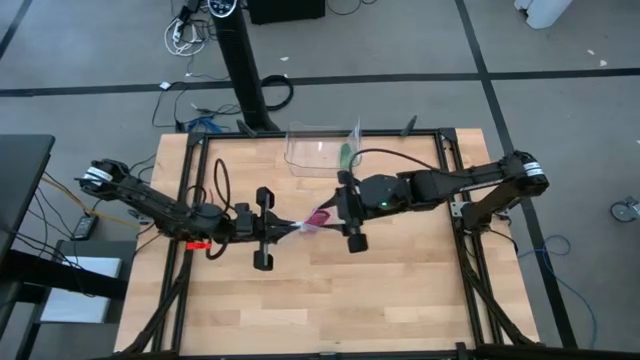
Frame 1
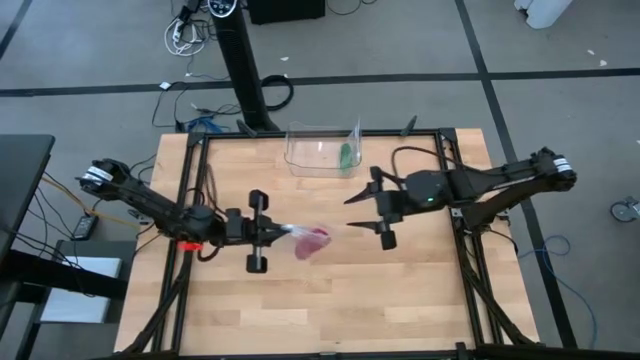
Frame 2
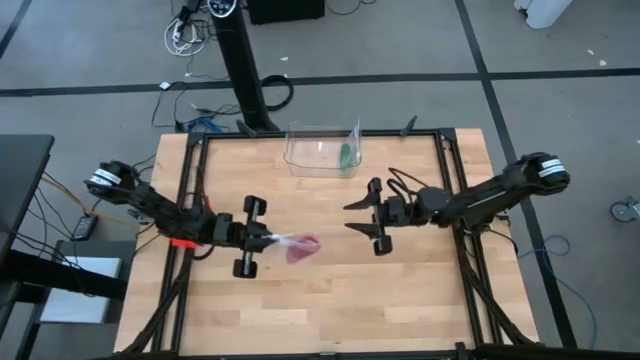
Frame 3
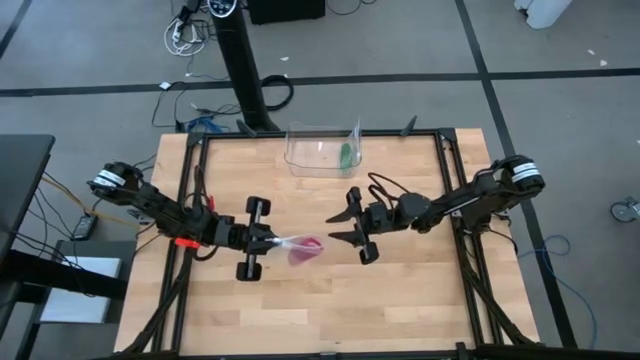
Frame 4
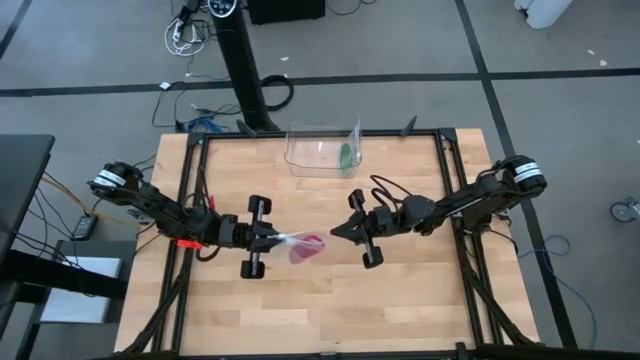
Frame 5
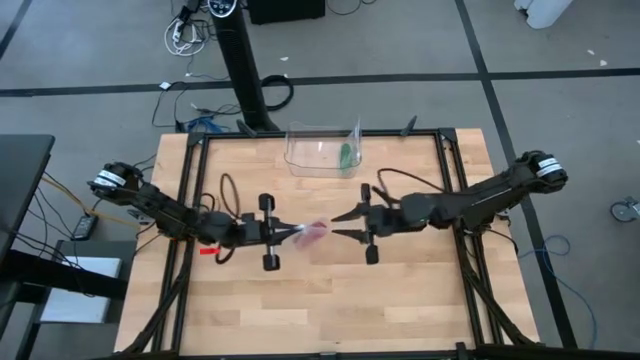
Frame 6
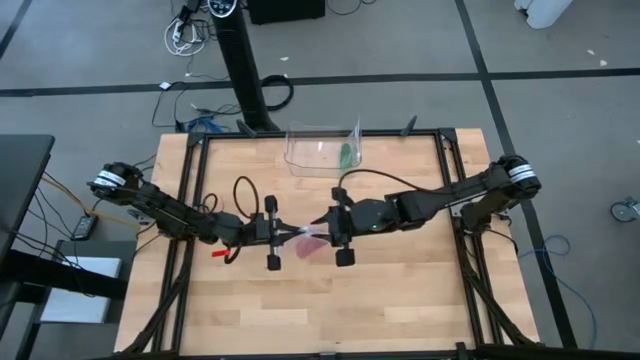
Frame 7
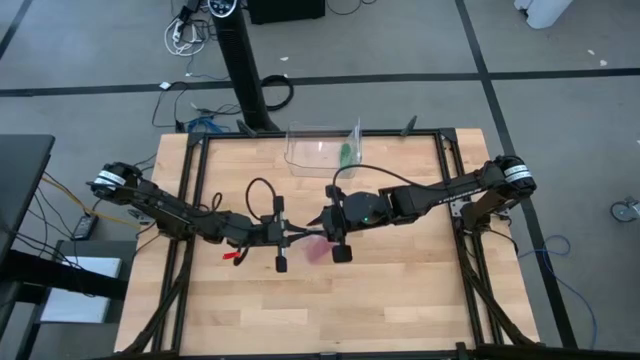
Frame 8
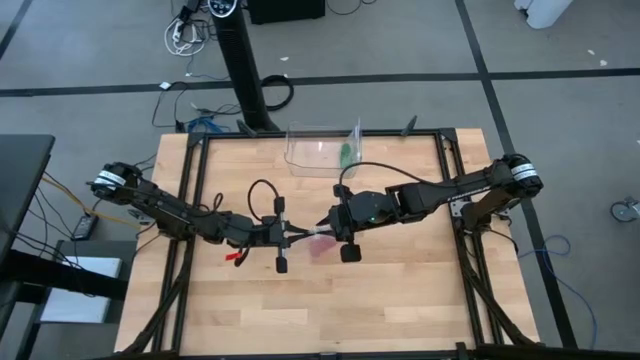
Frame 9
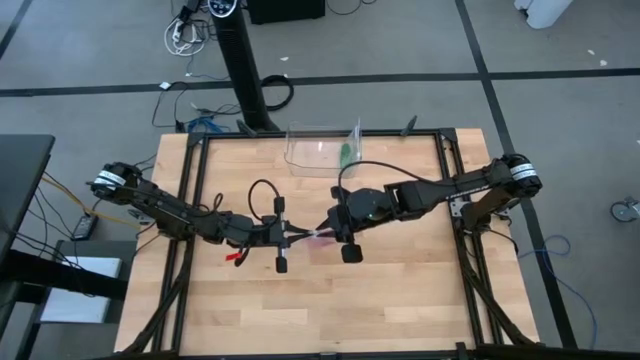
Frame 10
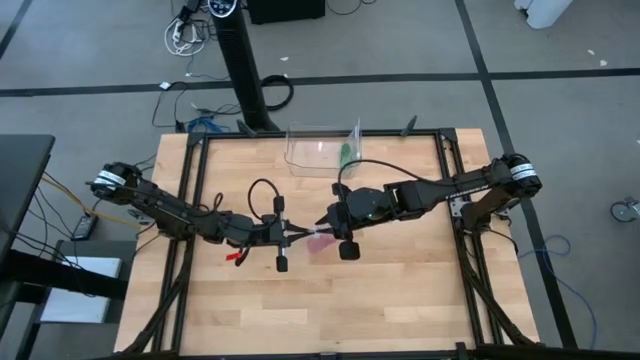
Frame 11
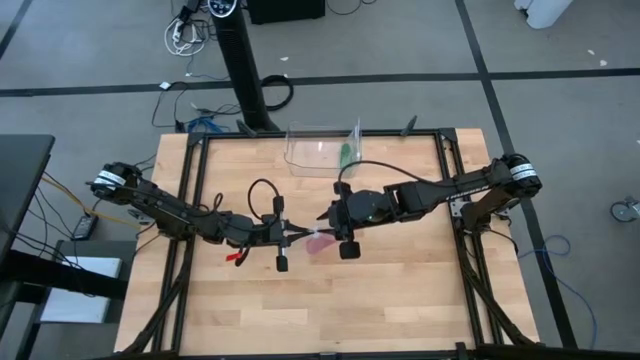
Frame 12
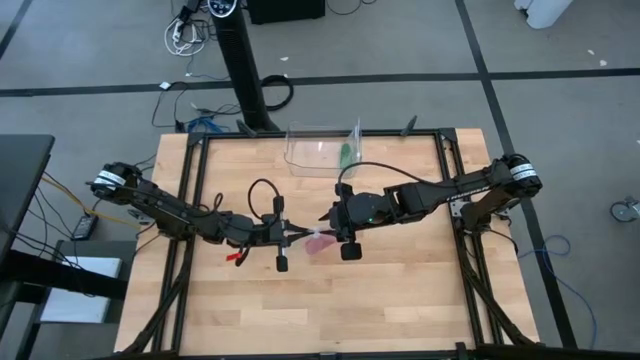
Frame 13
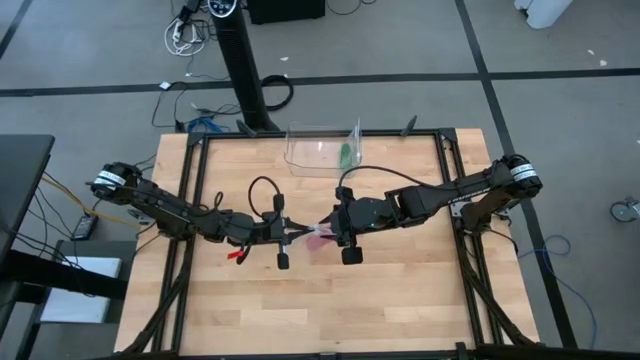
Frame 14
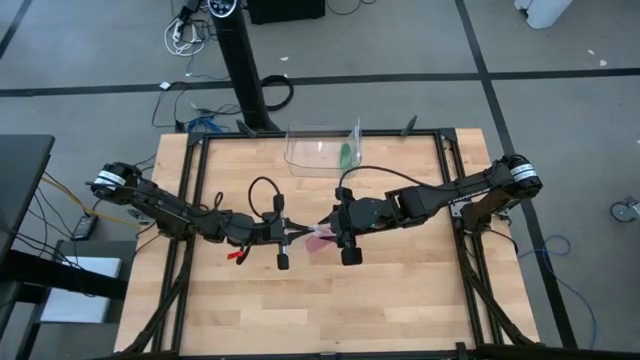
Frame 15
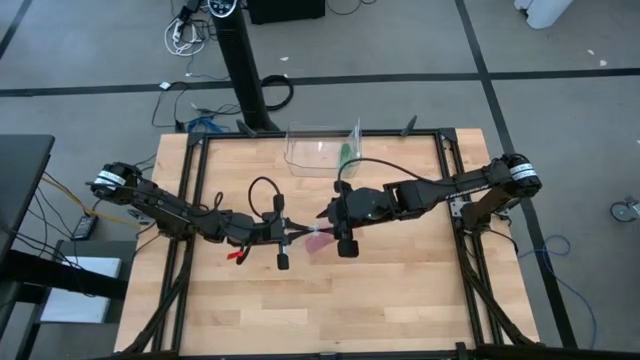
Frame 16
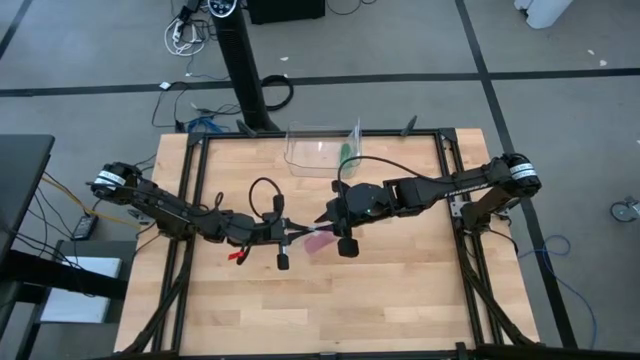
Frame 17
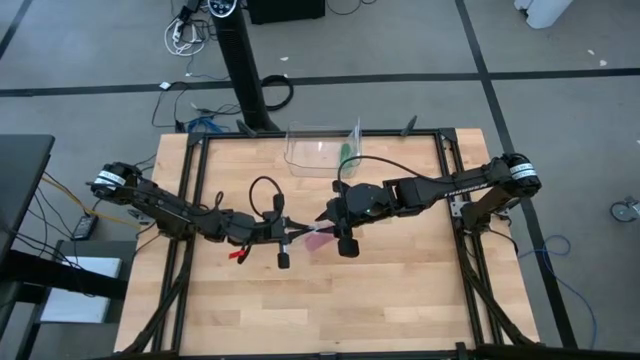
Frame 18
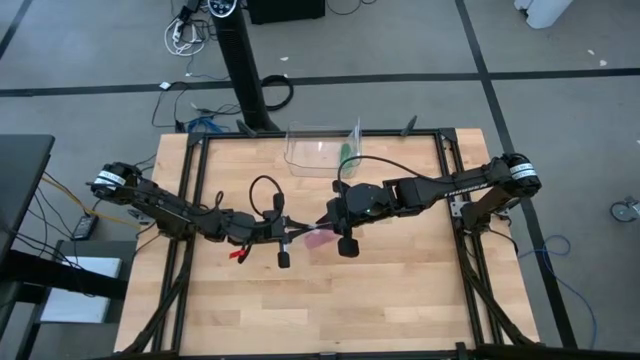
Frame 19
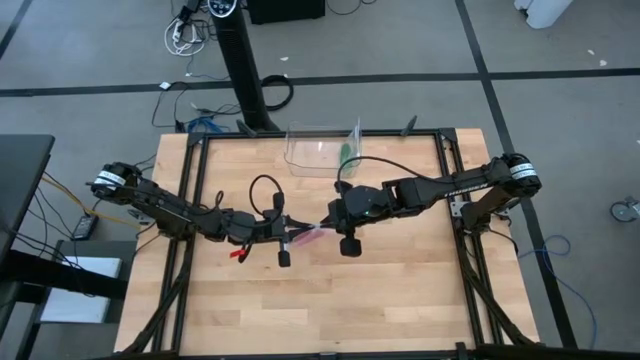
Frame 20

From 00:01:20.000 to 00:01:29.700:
Task: Roll bandage
Close the transparent zip bag

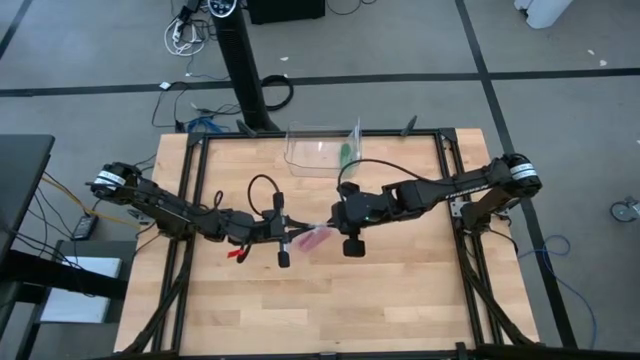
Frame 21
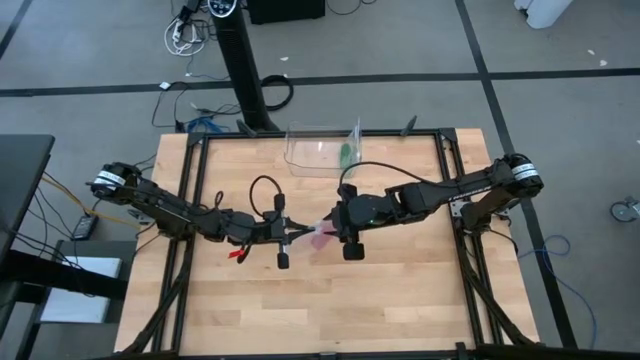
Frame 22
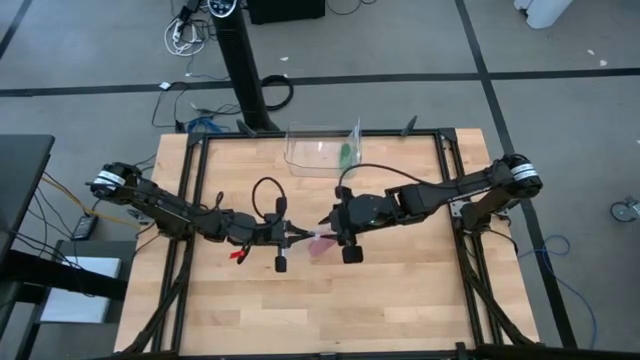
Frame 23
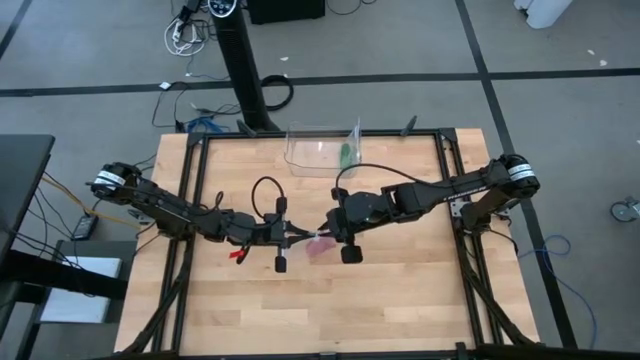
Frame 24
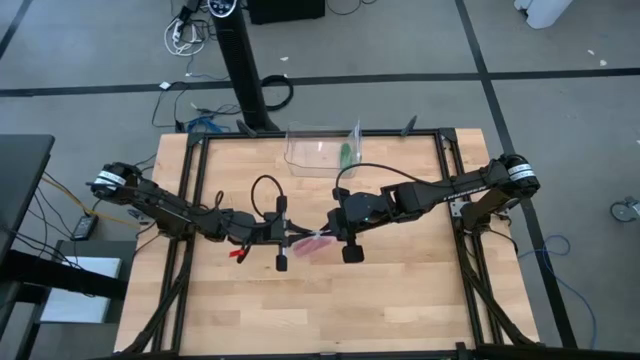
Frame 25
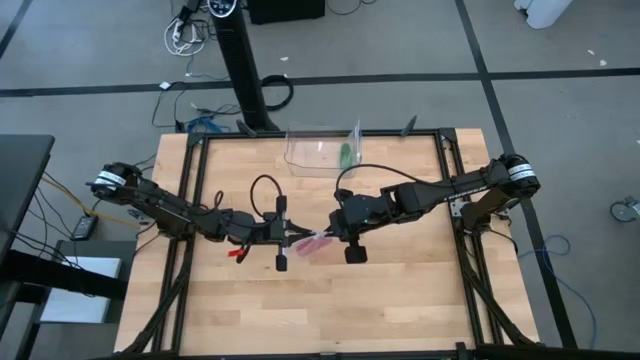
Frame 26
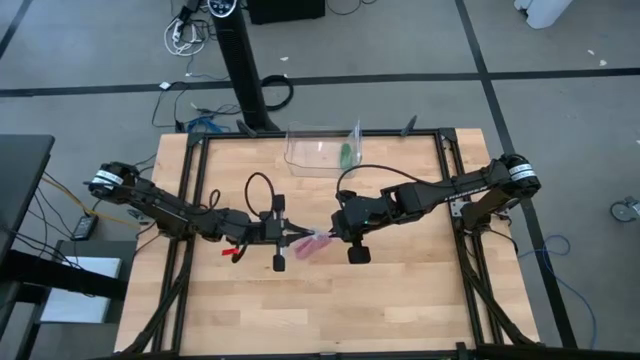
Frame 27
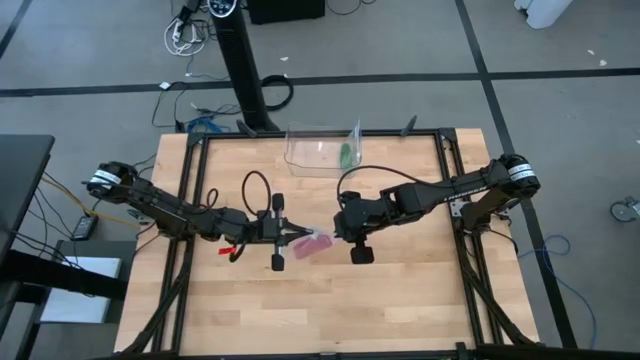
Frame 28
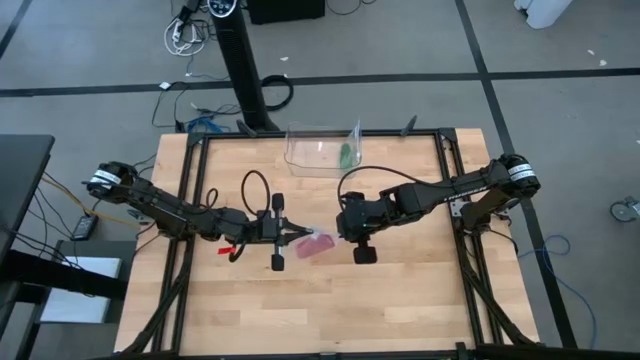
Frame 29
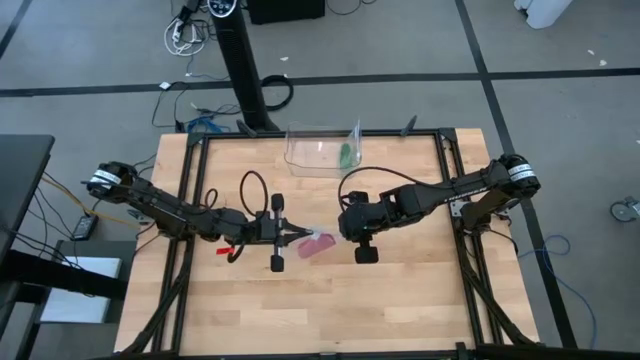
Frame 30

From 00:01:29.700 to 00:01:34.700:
Close the transparent zip bag

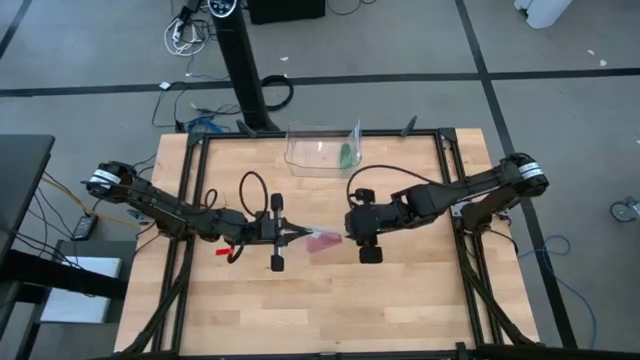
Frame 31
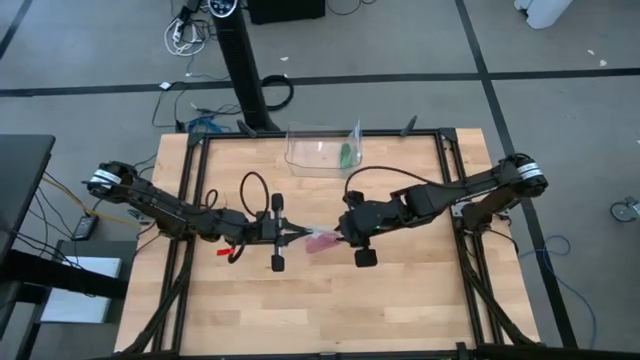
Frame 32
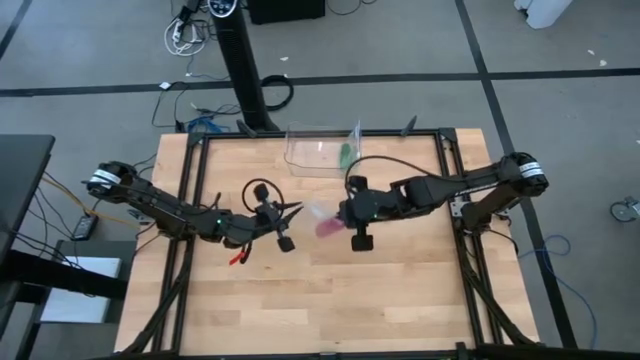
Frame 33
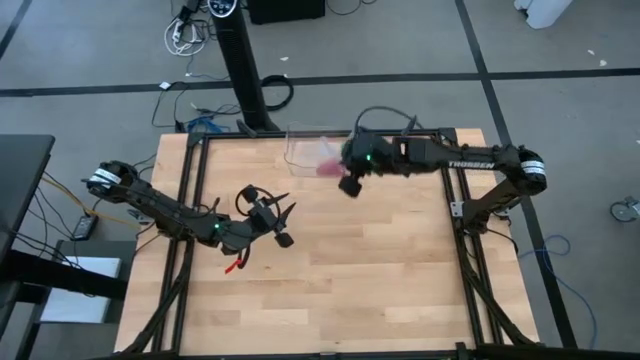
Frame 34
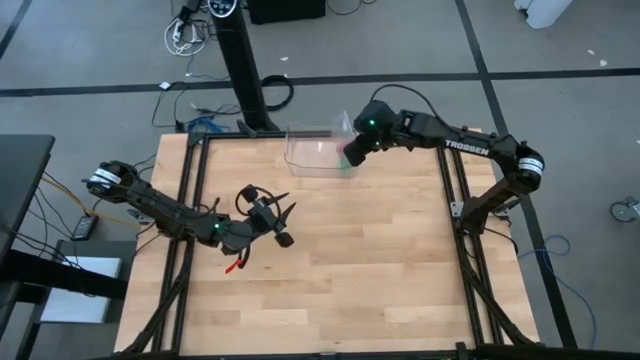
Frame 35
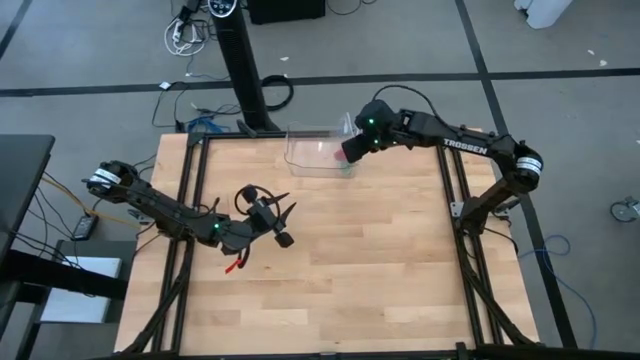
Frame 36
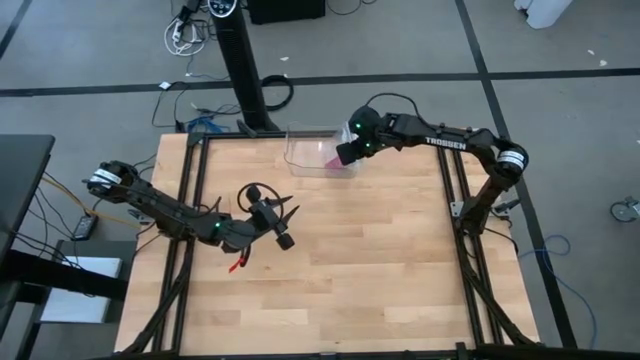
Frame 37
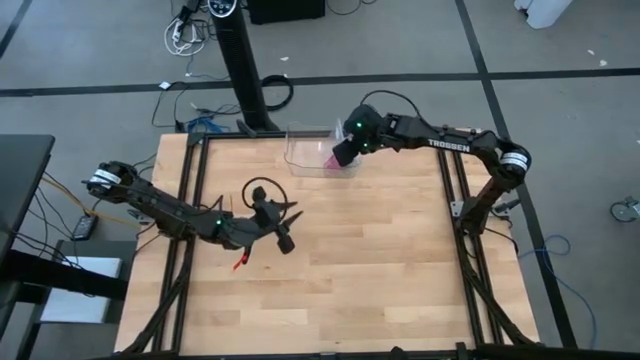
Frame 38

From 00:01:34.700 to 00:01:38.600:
Put the transparent zip bag into the transparent bin

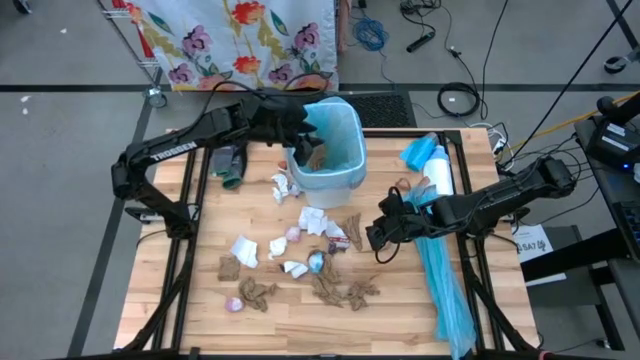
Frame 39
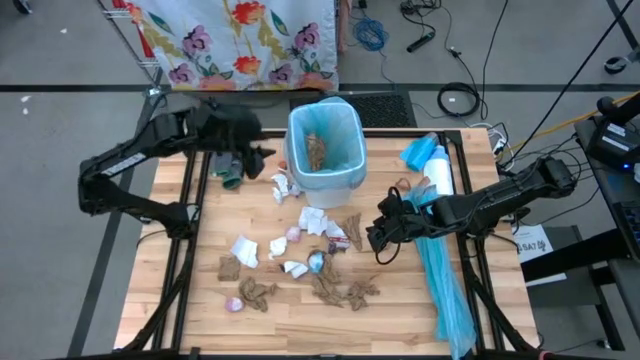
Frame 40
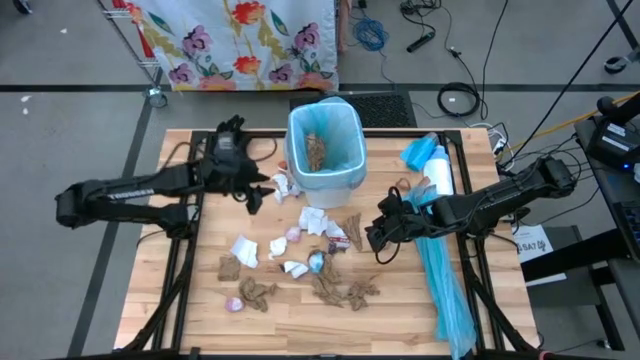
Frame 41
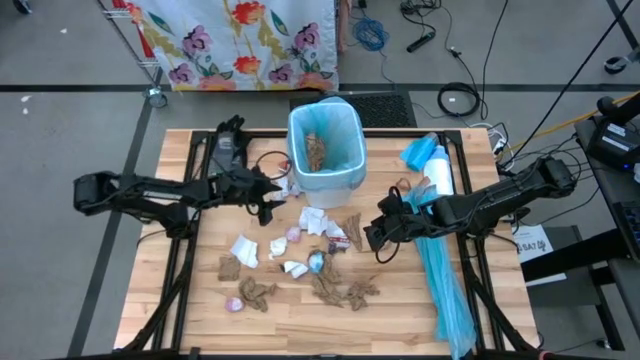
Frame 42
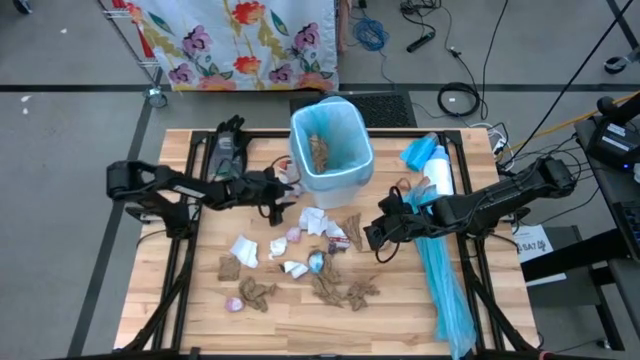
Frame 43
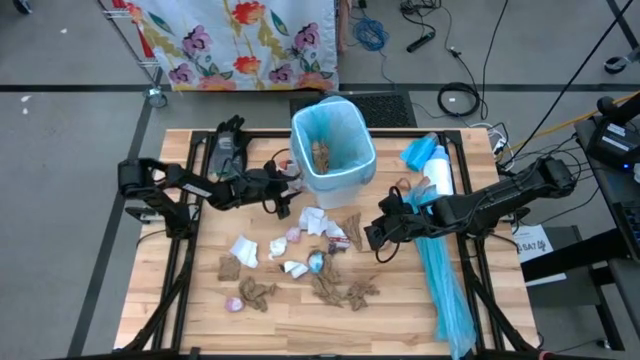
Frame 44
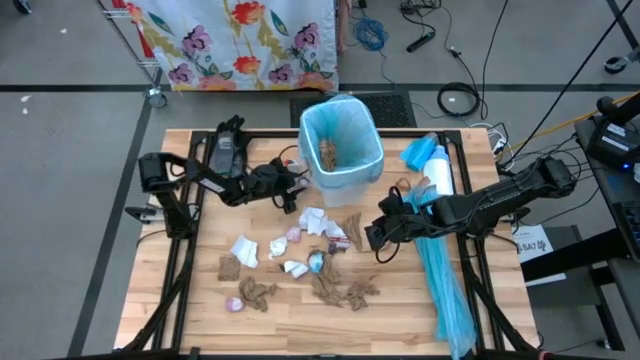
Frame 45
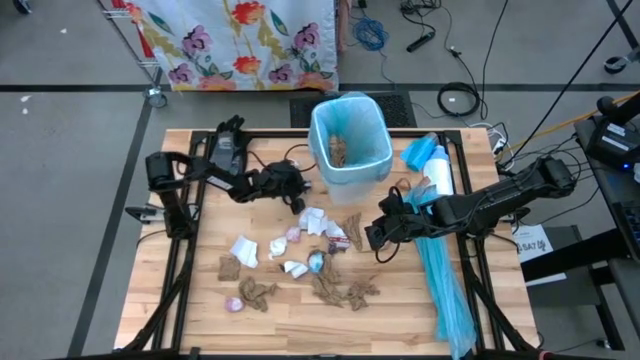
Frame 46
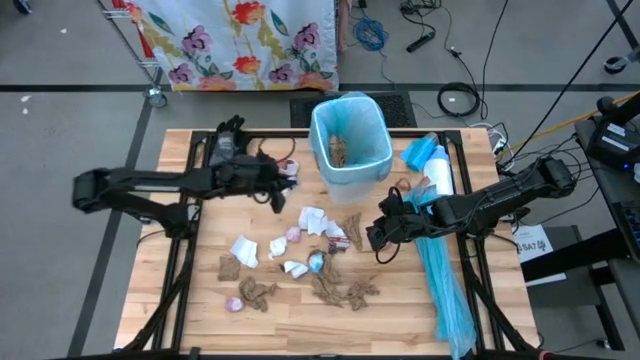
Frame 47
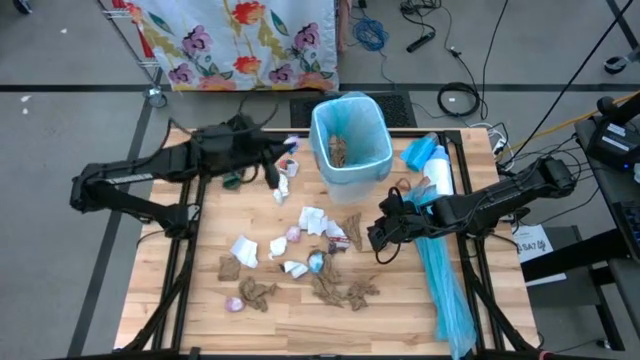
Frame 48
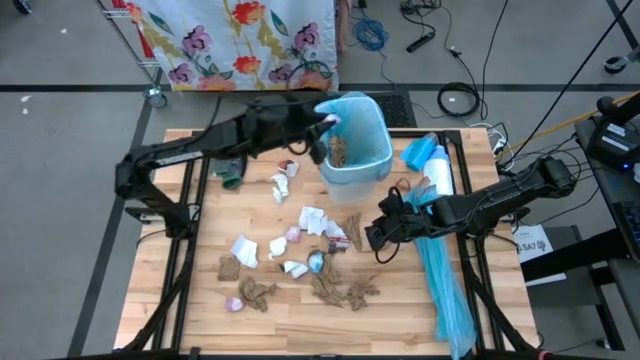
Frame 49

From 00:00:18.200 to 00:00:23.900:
Task: place trash/remove bag and relplace
Put the crumpled pink trash bag into the trash bin
